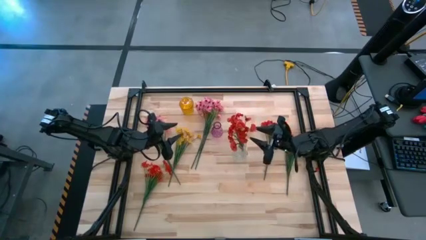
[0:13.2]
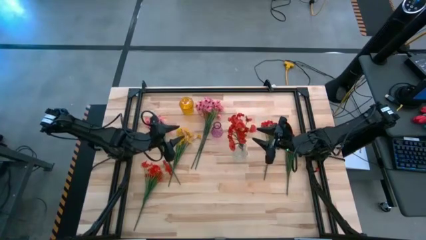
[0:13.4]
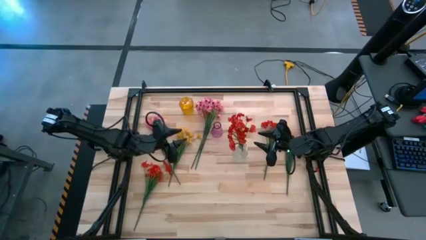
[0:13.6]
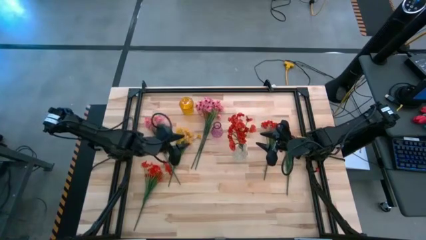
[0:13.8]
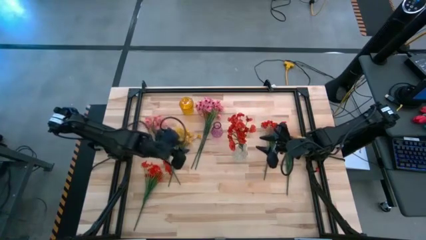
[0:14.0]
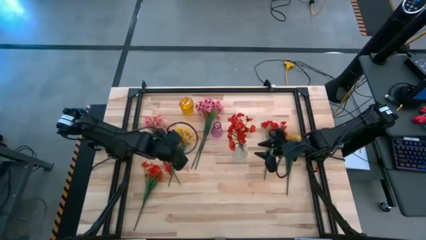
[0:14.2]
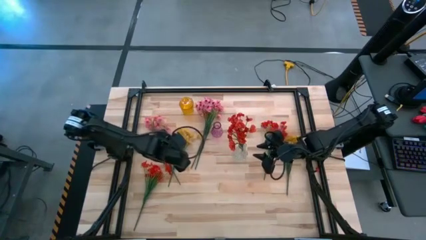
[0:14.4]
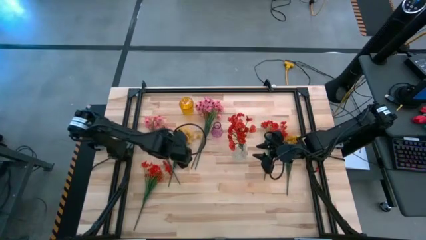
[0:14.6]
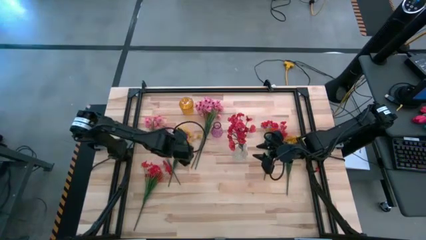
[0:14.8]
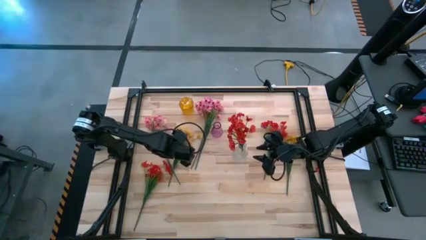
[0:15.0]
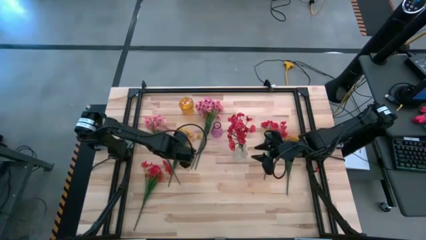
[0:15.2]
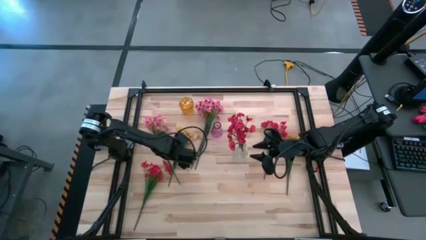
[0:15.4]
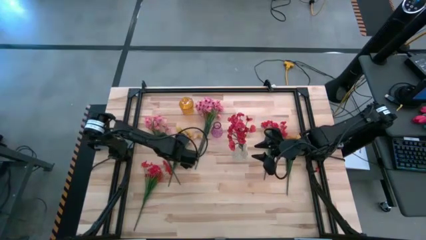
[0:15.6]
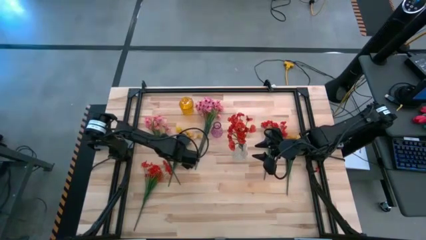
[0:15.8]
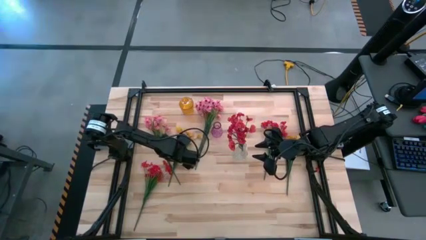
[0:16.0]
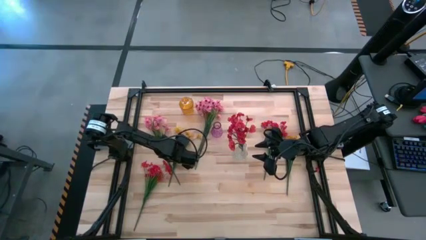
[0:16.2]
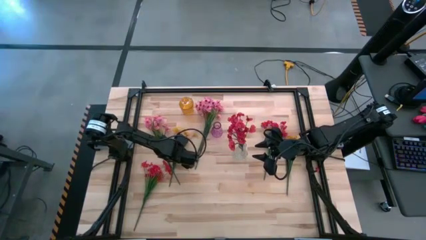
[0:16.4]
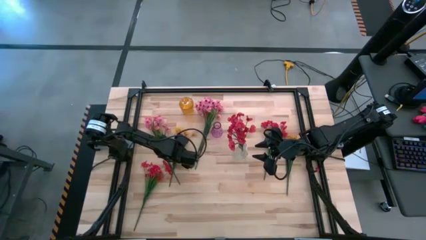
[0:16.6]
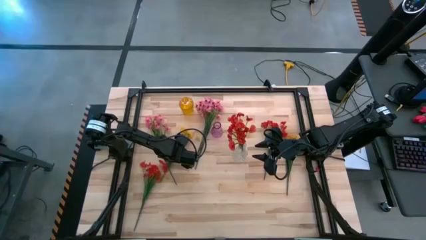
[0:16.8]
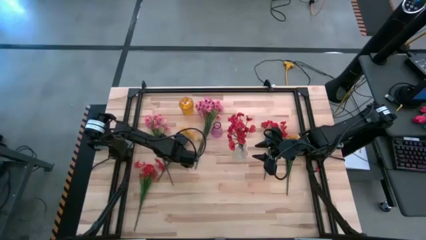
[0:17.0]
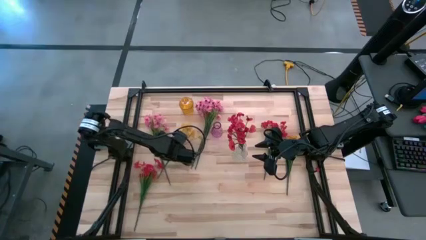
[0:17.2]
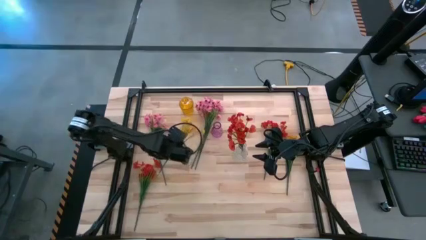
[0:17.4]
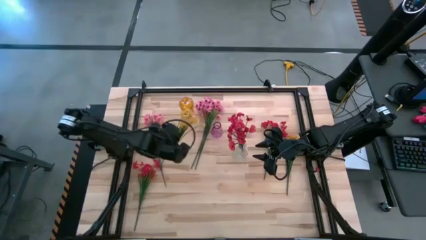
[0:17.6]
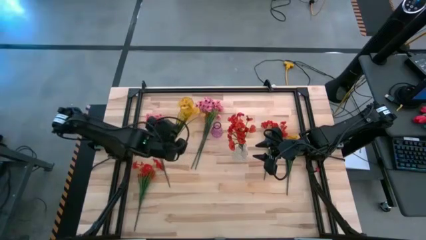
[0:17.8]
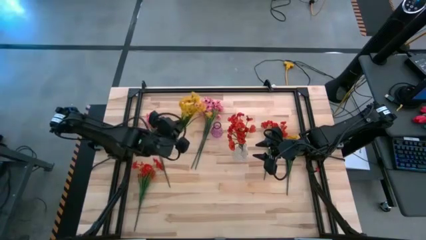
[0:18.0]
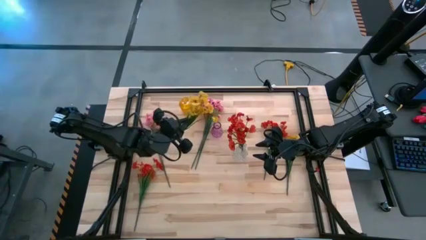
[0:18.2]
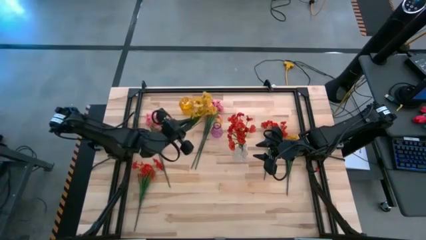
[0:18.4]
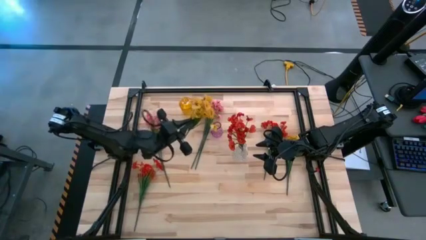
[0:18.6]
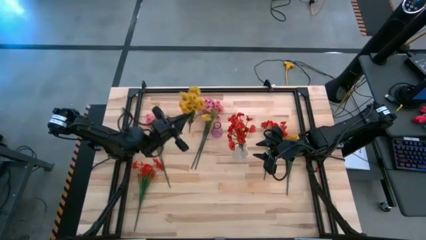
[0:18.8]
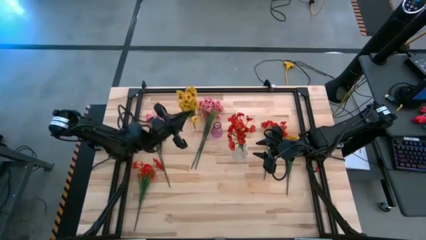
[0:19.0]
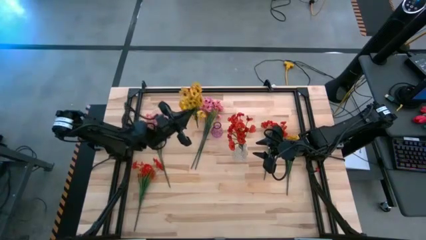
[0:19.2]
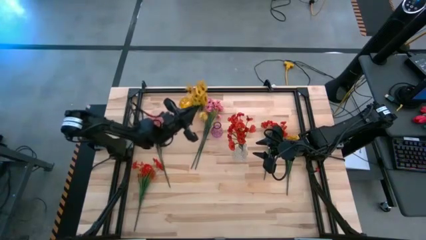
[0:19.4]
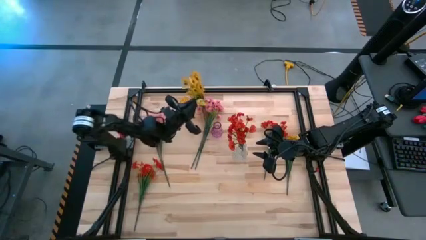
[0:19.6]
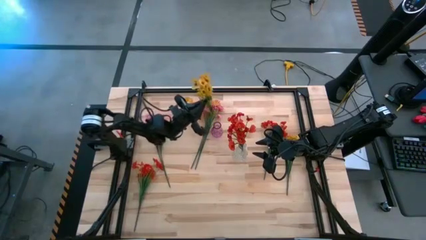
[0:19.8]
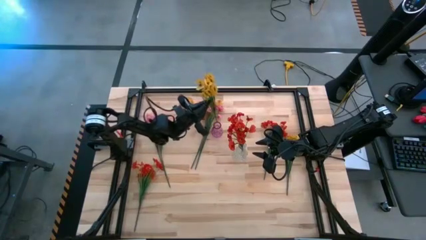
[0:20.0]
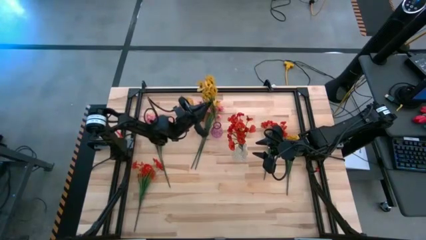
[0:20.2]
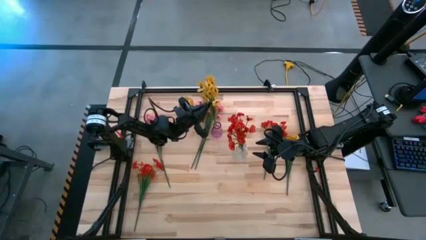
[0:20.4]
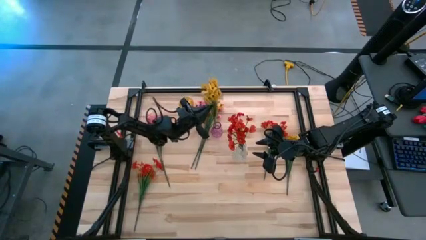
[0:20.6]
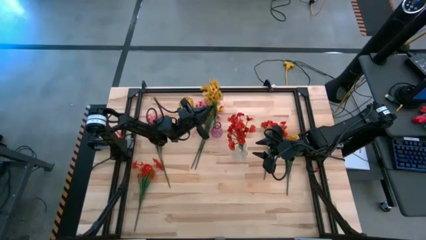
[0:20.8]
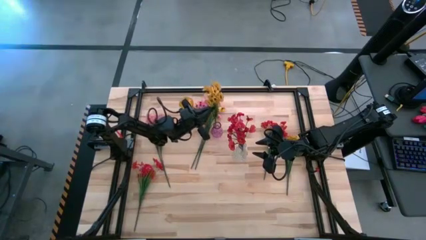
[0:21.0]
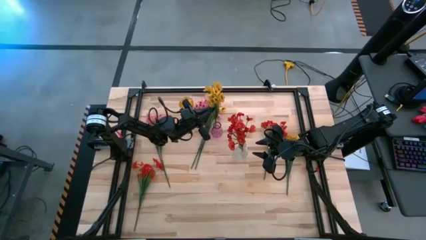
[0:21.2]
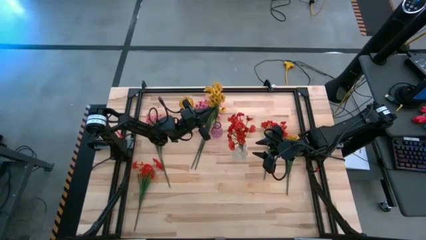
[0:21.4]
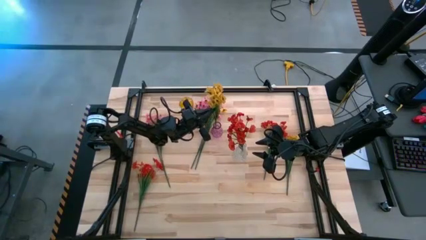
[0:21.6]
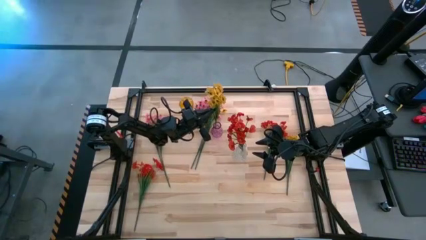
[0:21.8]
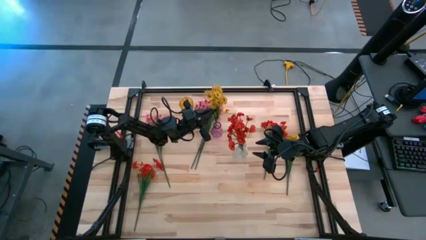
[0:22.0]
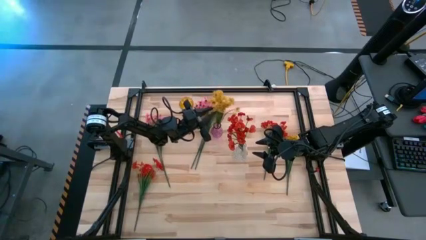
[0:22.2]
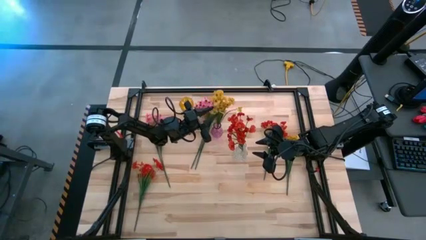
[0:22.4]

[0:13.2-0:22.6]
Task: Sort flowers into vase by color
Put the left yellow flowers into the violet vase

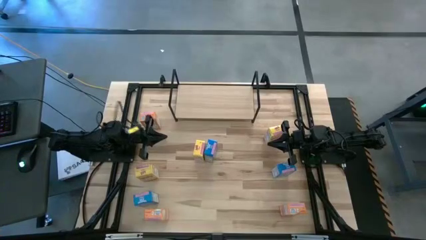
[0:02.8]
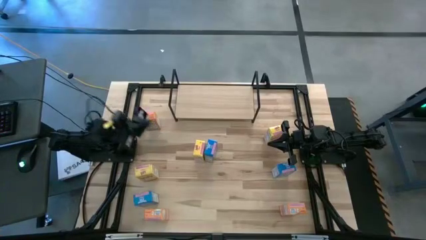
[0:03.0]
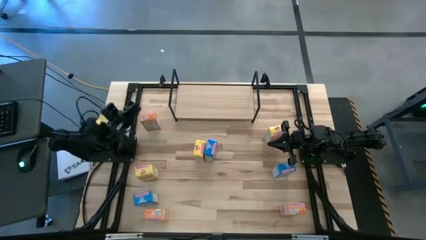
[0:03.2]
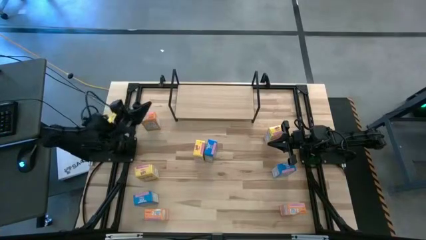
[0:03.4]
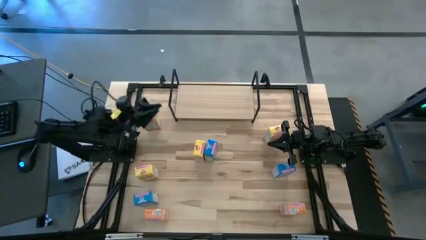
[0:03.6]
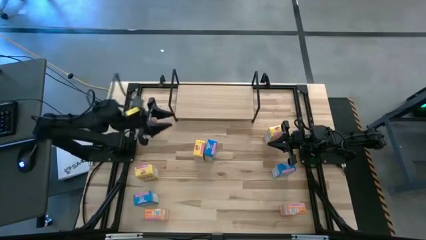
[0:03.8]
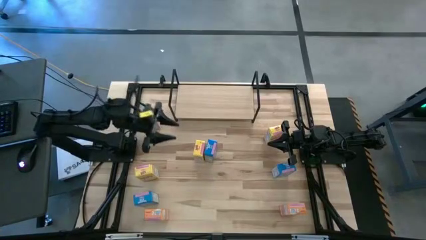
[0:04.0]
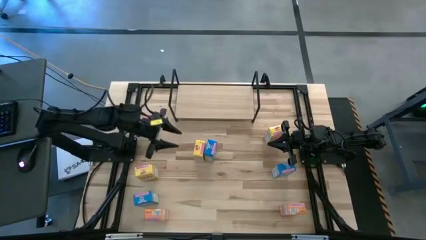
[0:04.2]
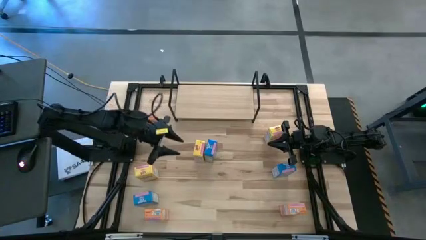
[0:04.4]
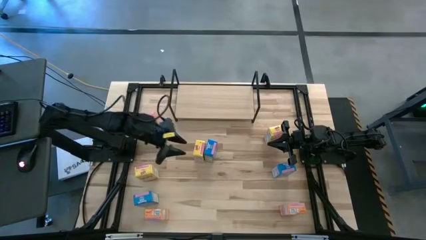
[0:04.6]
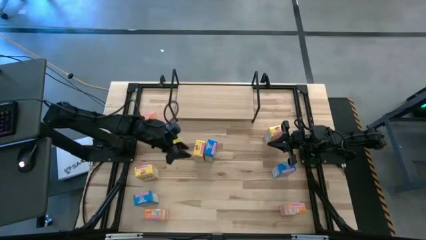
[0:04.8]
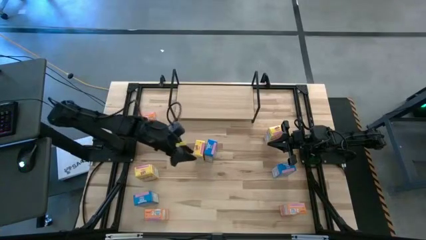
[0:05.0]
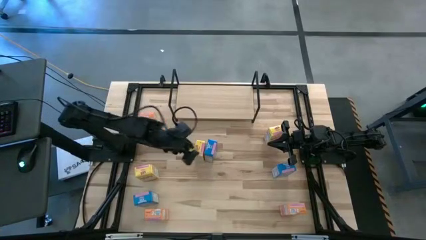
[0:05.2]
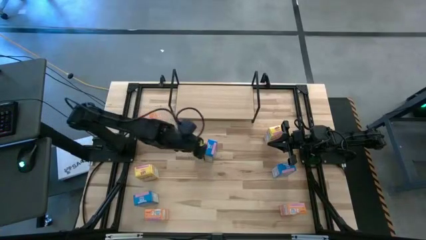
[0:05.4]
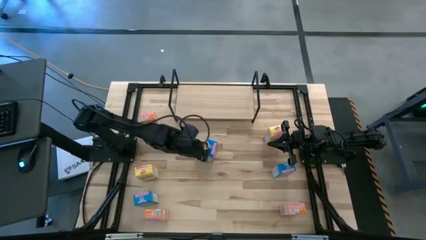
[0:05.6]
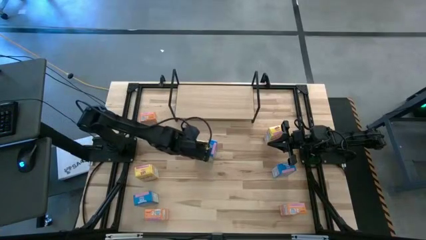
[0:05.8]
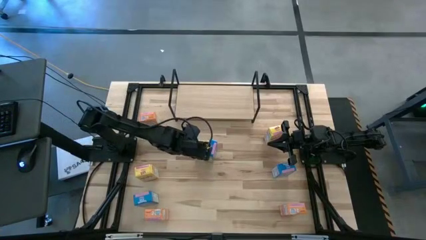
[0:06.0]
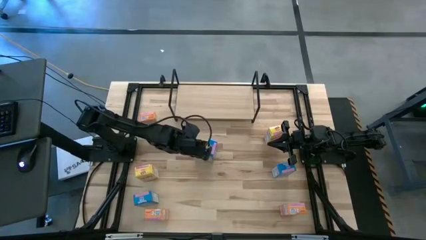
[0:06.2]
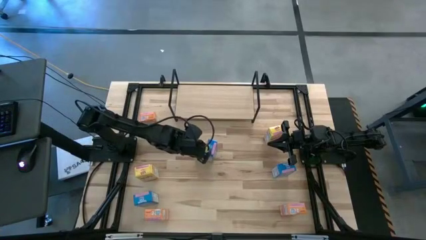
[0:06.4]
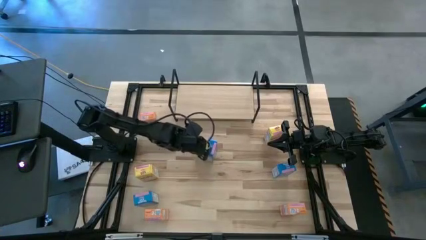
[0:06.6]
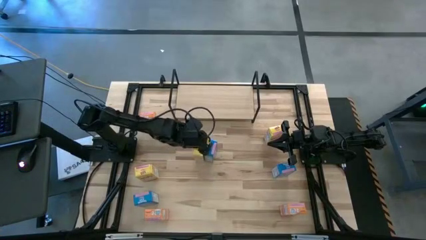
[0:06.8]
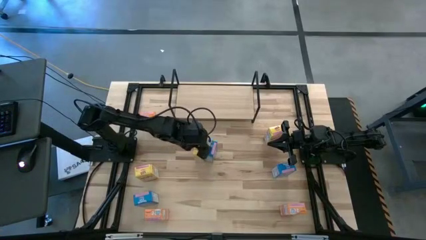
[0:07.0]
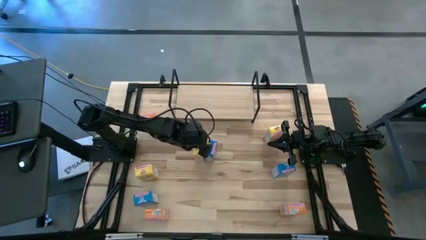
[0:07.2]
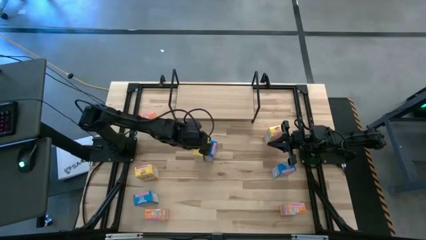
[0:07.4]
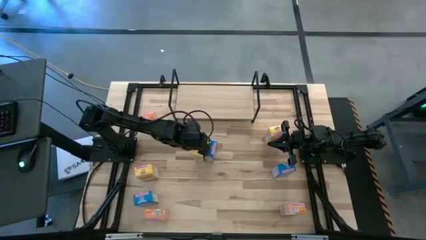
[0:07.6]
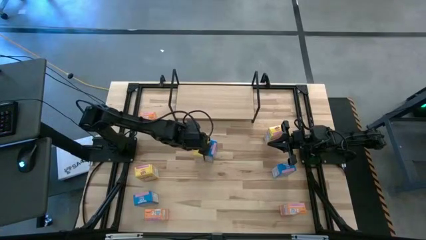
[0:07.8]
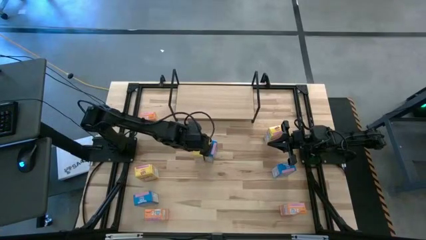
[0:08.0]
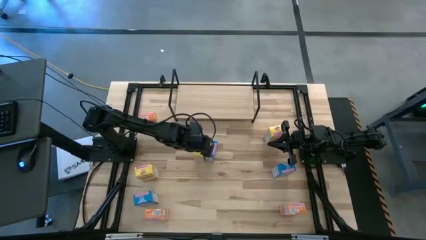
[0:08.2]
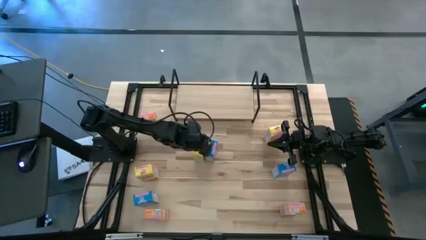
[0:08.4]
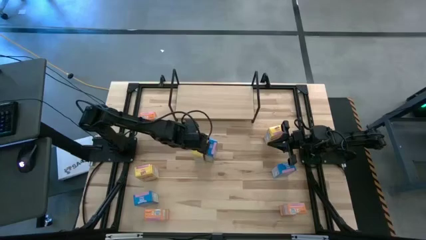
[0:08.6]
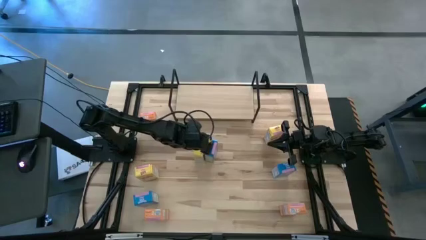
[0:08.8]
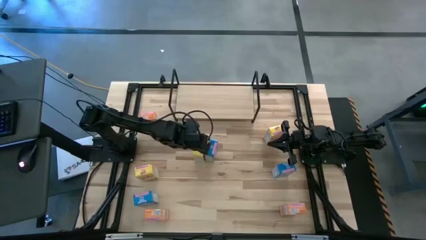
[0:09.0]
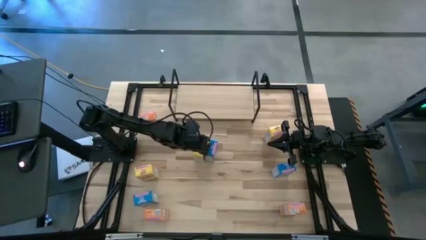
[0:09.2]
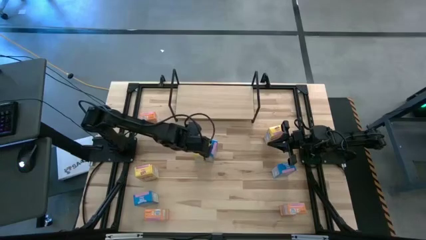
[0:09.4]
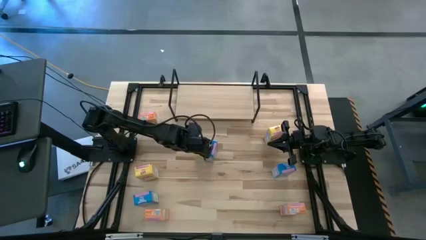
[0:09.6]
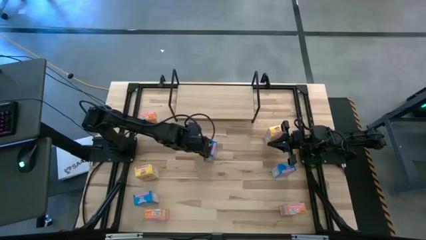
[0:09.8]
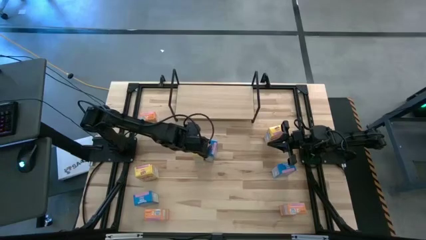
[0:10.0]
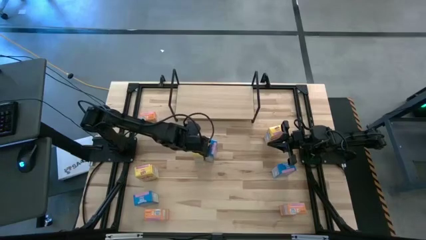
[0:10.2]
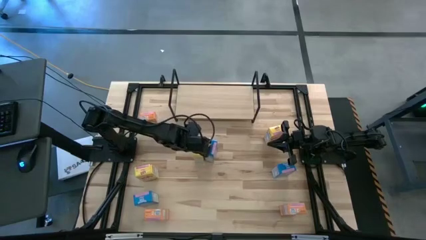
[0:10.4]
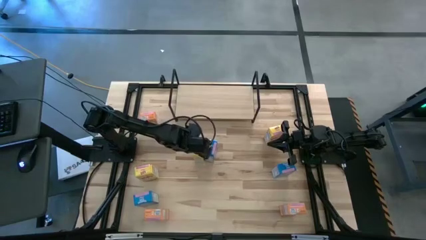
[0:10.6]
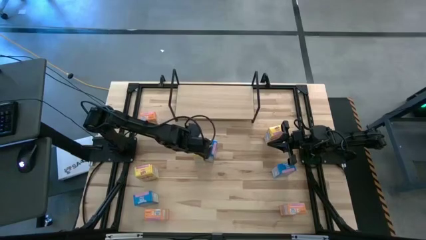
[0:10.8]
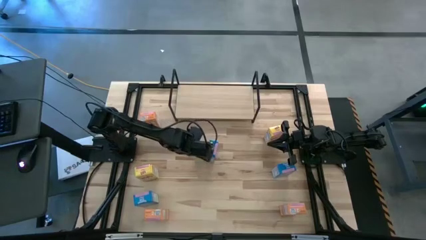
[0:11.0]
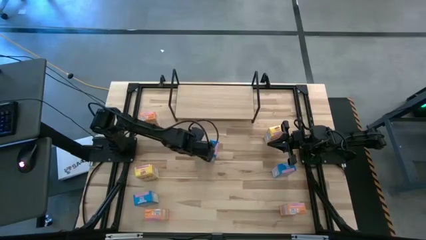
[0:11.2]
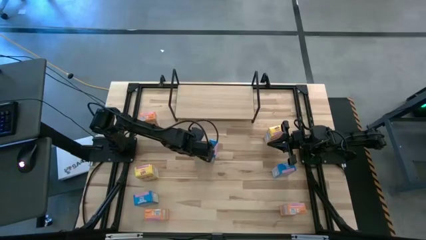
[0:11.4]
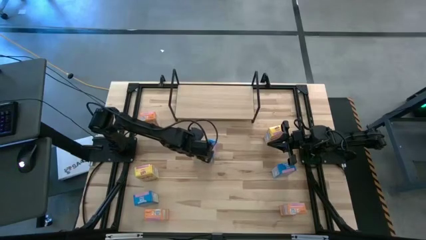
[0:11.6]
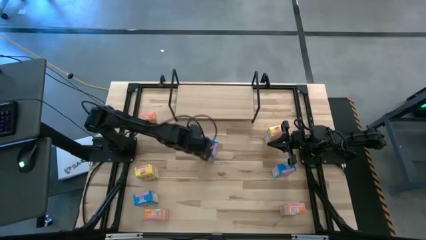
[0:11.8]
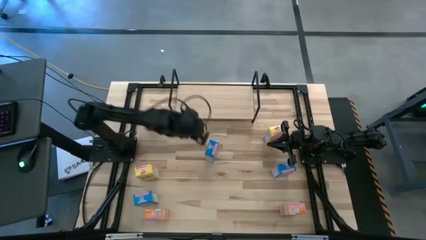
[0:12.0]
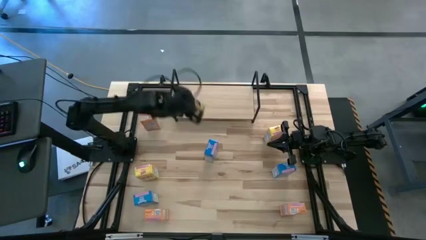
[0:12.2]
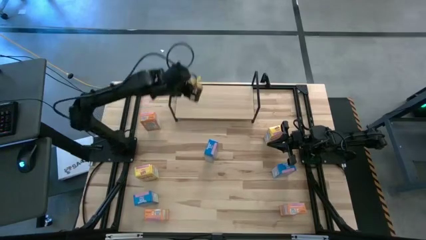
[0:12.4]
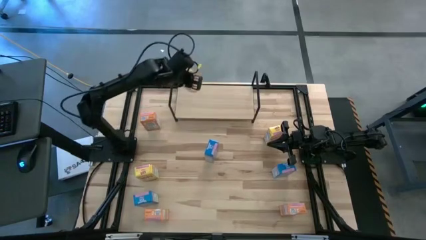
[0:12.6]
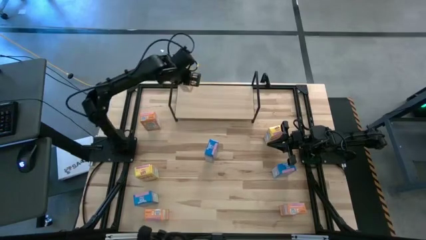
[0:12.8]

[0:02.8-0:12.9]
Task: Stack cereal on shelf
Put the middle yellow cereal box on the shelf
